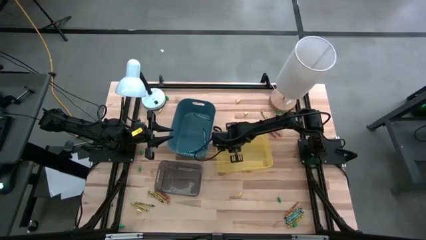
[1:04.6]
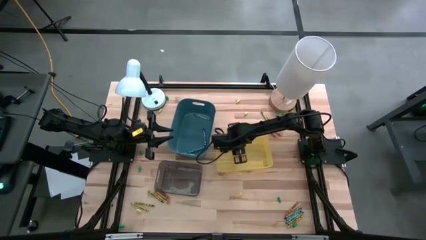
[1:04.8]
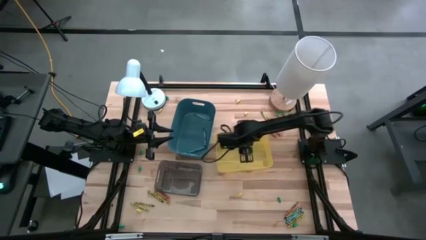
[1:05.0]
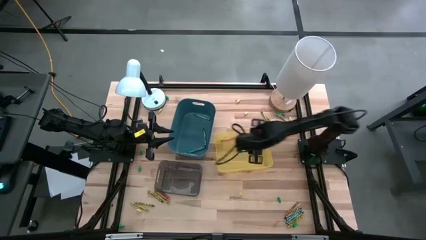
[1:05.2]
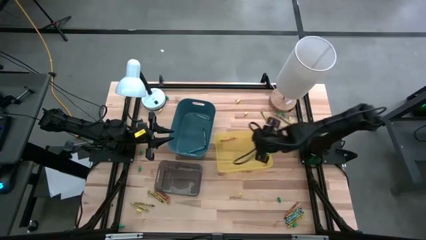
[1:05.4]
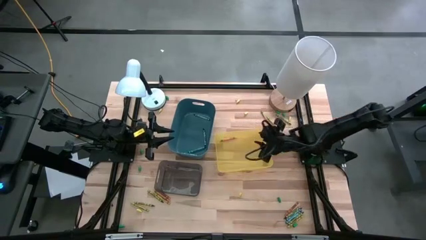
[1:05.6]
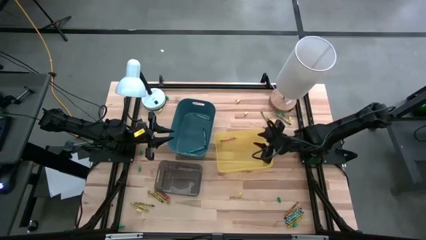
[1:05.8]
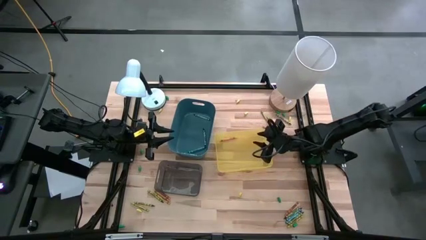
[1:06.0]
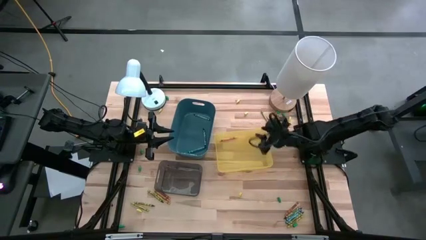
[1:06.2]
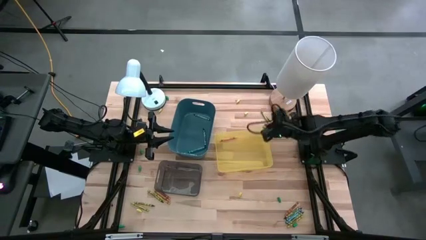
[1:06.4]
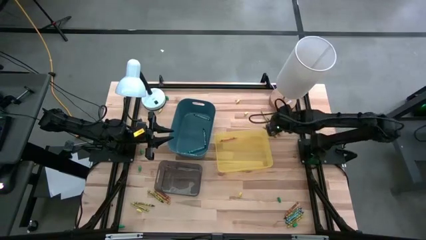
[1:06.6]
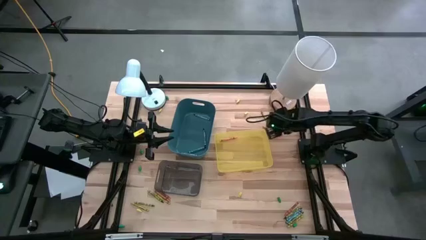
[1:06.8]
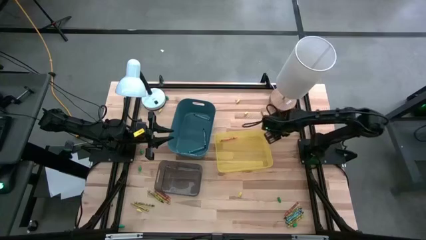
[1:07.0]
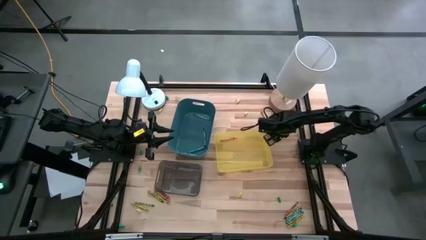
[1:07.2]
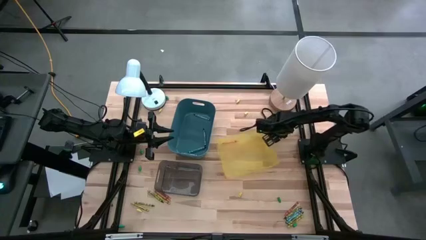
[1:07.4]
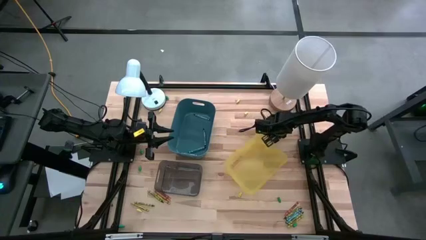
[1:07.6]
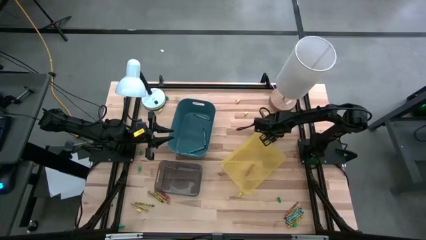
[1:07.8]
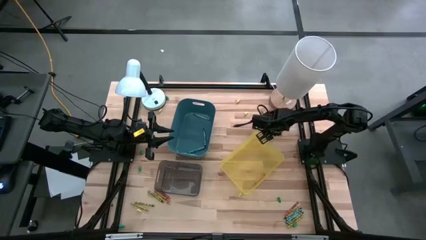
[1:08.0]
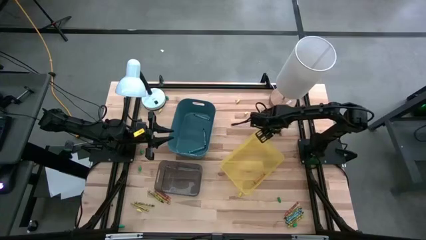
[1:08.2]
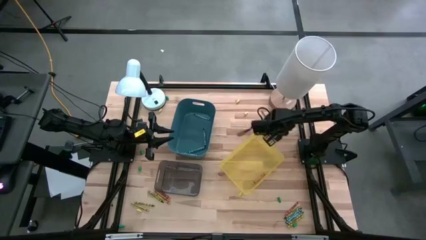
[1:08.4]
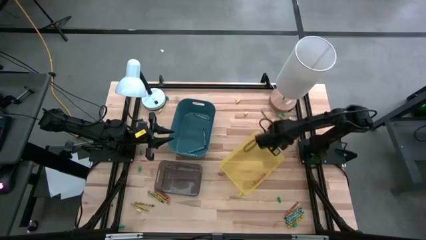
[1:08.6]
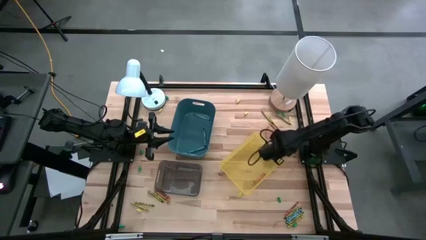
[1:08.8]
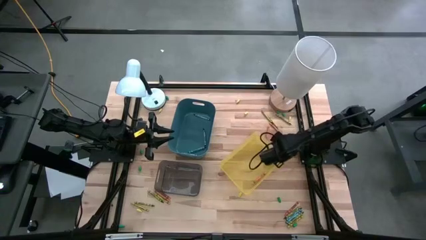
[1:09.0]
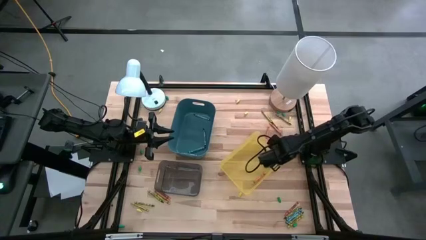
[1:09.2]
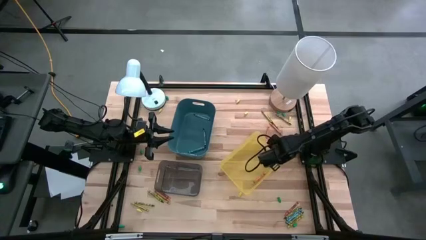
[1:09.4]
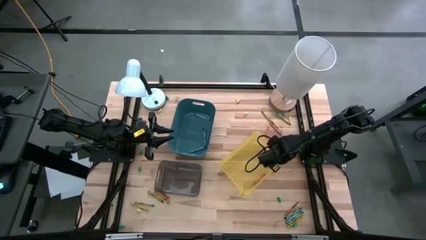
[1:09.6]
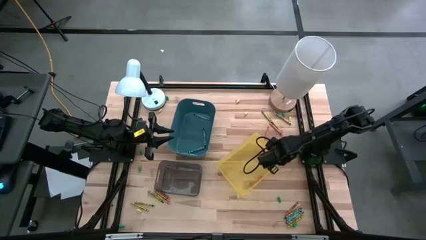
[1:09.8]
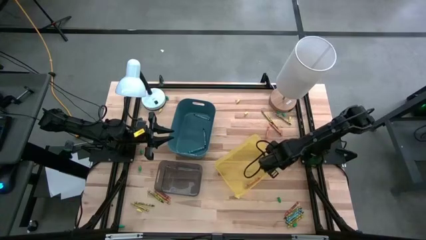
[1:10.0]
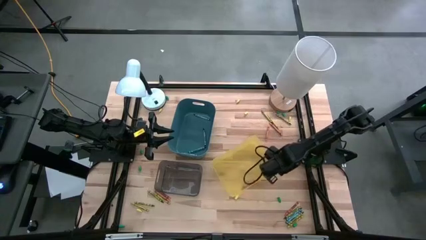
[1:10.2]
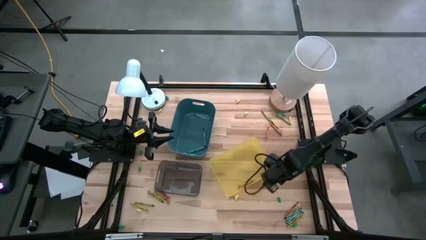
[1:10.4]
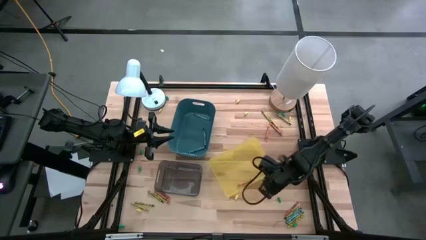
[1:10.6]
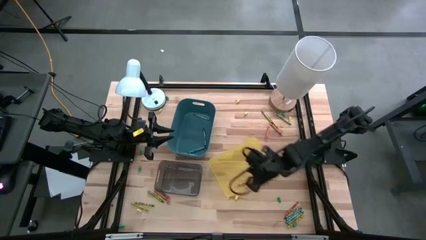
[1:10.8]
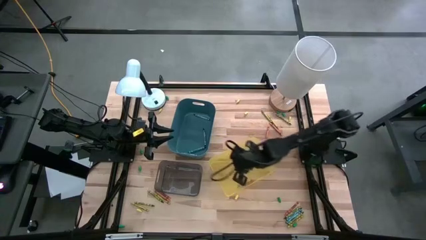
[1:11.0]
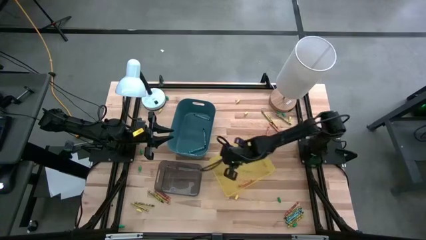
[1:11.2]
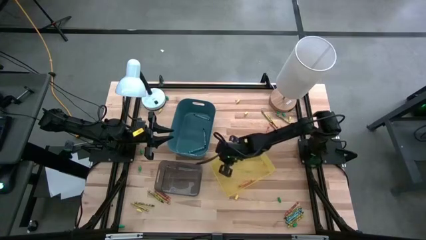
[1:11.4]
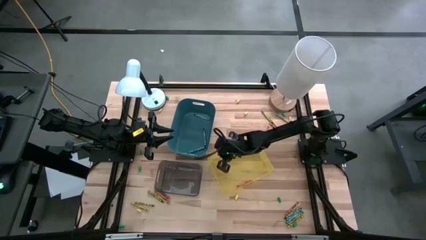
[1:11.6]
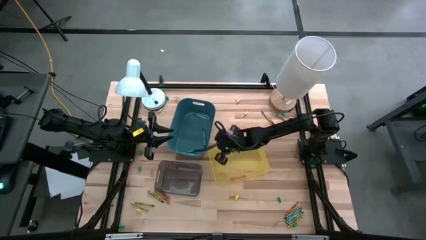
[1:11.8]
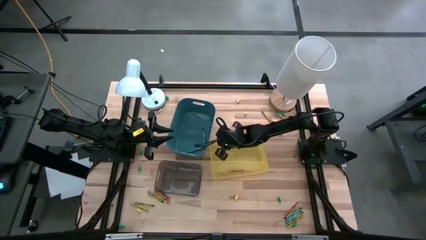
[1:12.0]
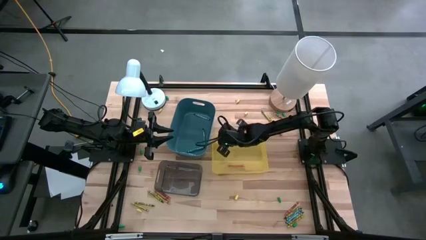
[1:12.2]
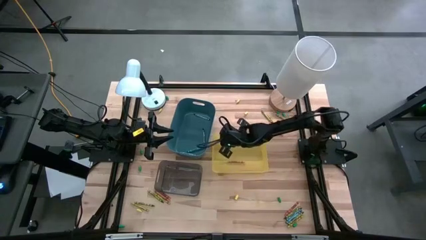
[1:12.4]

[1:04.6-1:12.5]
Task: Sort crayons
Adjust the yellow bin

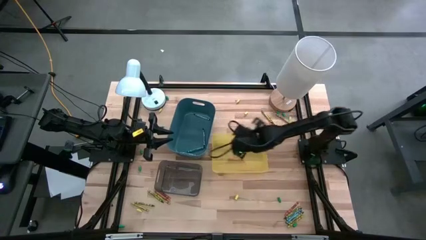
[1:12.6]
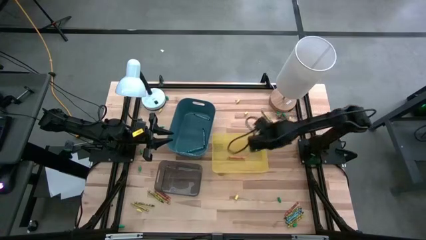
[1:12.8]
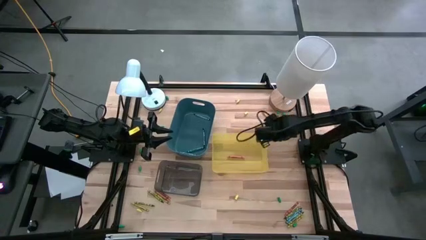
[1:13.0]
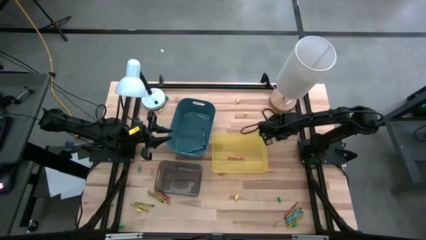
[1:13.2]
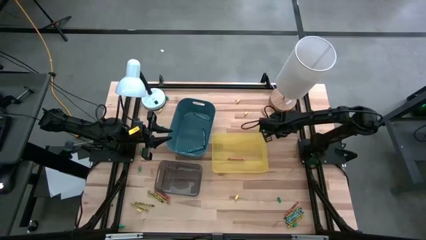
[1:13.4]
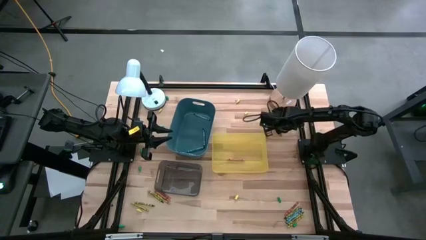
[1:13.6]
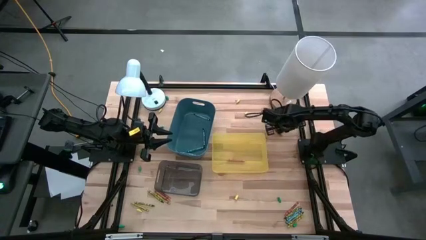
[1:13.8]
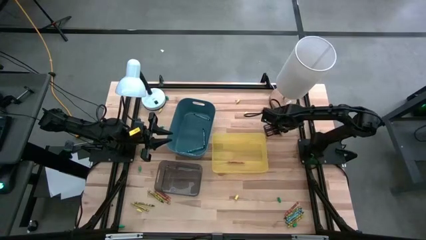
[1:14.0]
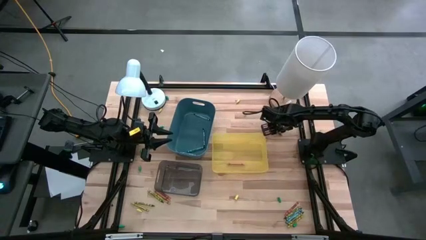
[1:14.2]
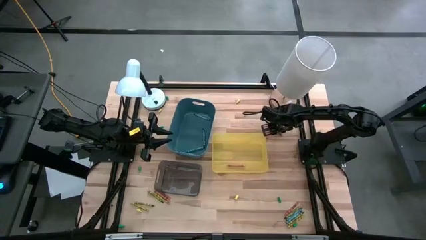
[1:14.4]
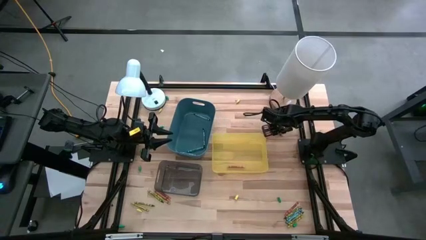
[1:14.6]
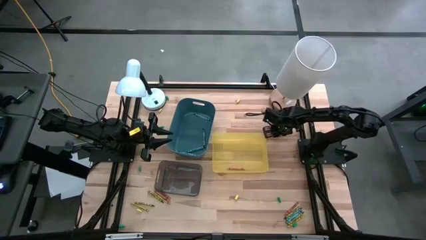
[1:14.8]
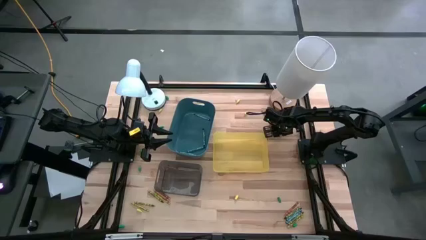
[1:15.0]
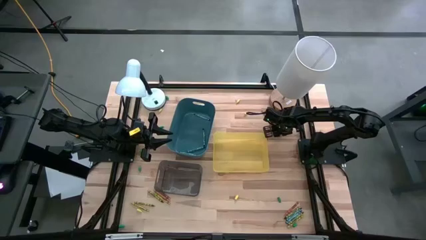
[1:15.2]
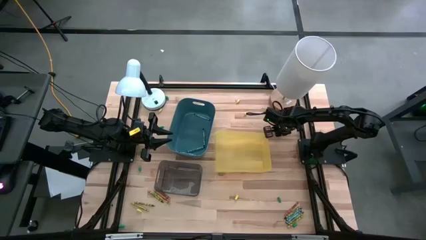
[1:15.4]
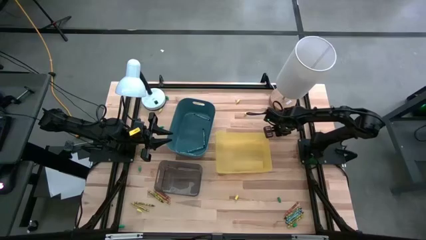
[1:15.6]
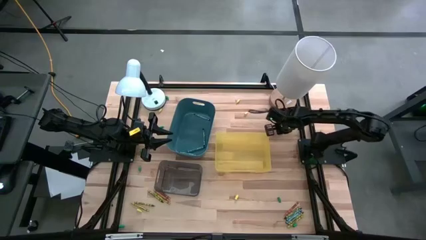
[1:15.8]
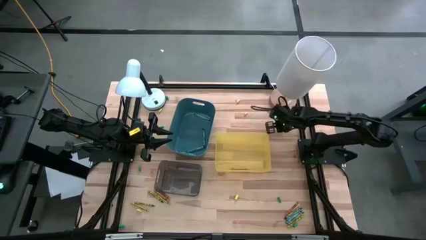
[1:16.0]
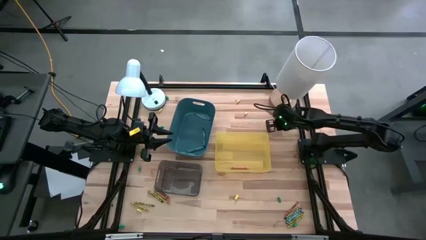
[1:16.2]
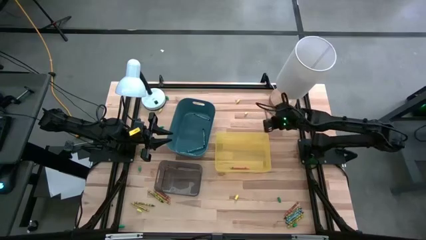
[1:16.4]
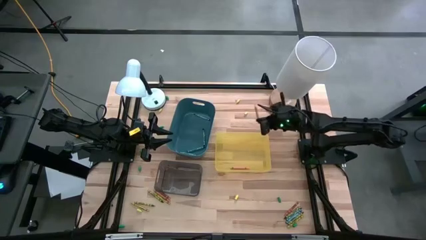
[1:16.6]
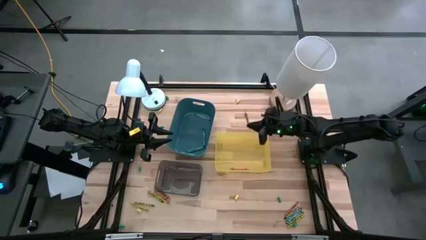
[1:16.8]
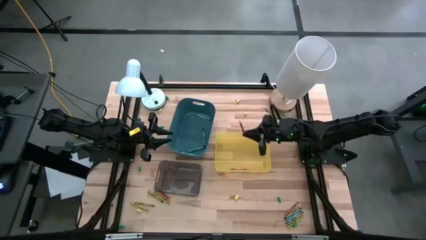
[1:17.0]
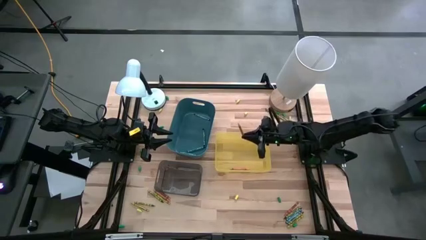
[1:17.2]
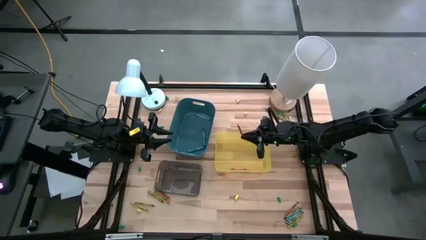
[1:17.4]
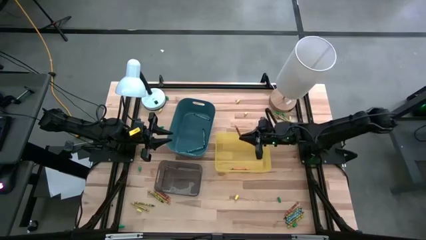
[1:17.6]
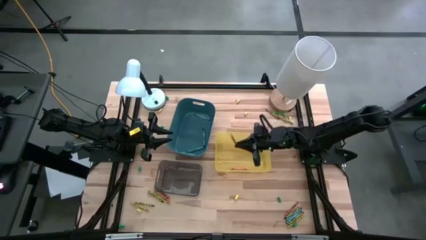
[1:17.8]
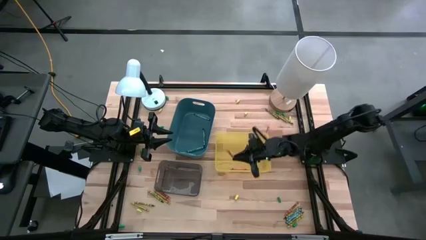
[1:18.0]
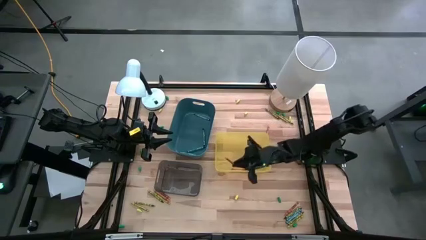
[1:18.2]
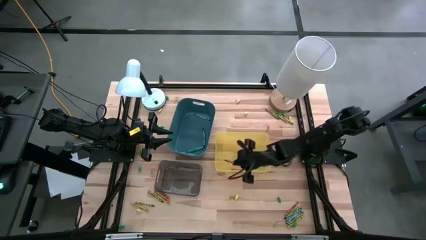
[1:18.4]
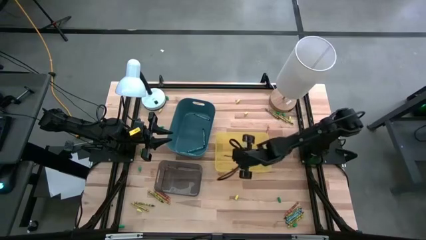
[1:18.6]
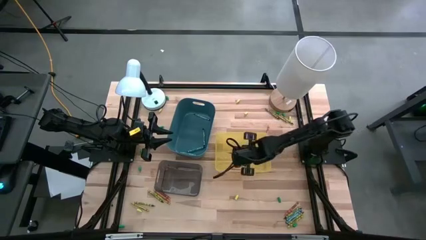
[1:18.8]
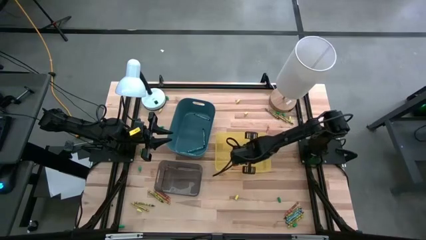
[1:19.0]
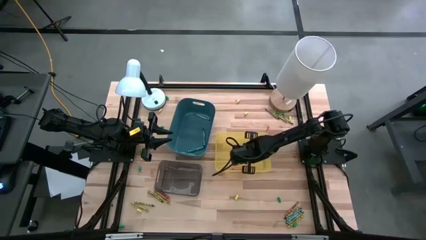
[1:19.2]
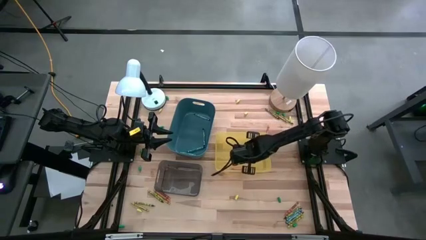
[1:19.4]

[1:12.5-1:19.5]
Put the orange crayon into the yellow bin

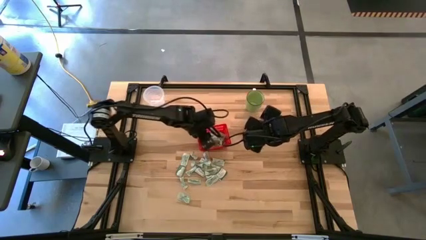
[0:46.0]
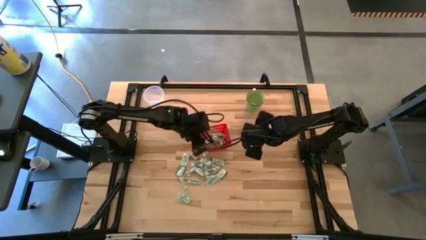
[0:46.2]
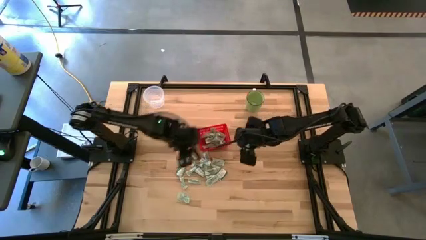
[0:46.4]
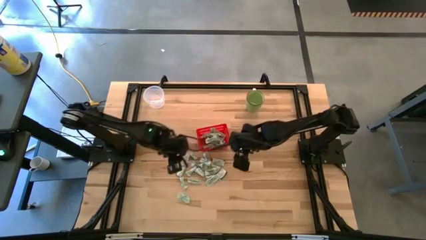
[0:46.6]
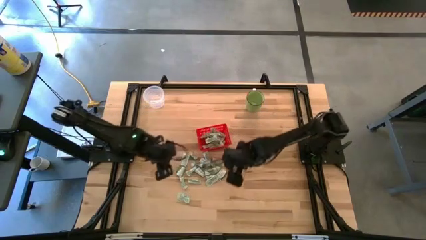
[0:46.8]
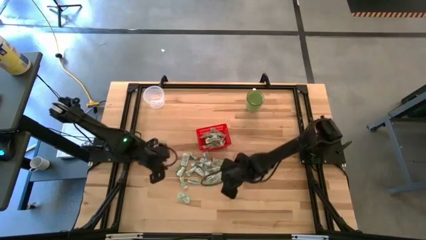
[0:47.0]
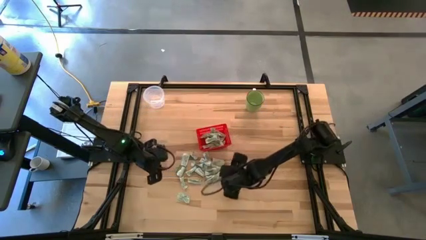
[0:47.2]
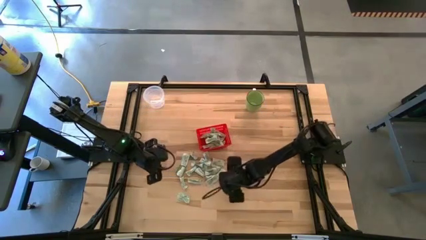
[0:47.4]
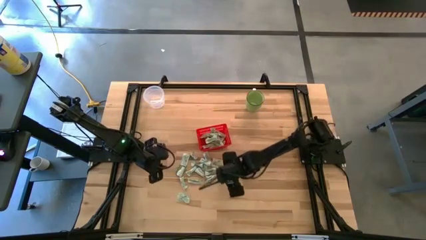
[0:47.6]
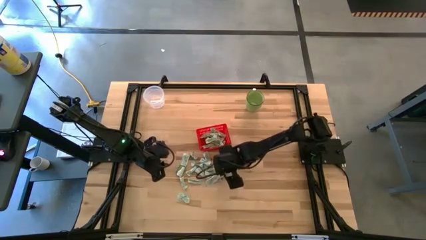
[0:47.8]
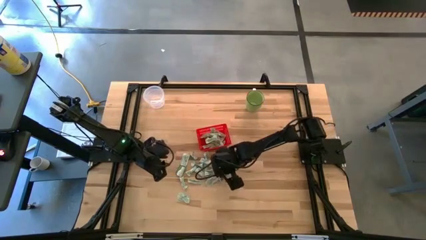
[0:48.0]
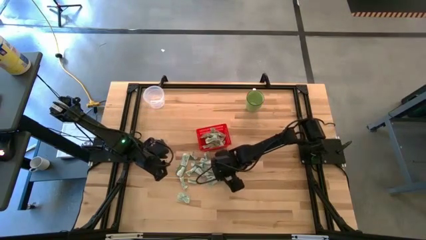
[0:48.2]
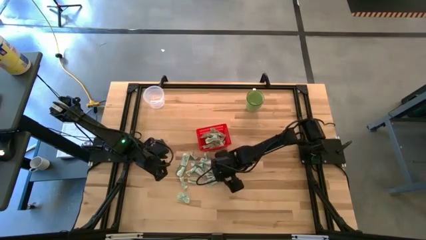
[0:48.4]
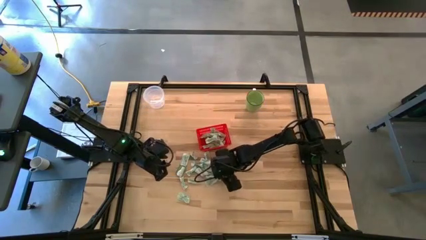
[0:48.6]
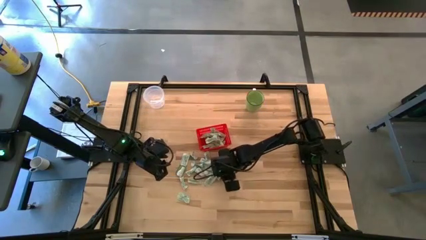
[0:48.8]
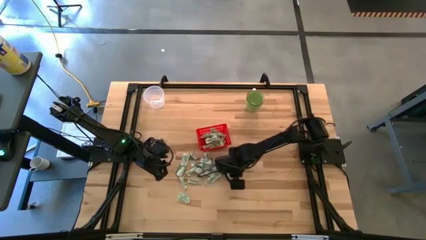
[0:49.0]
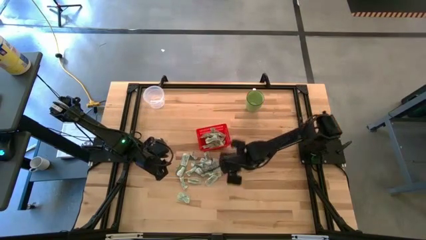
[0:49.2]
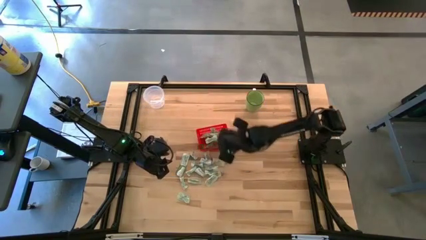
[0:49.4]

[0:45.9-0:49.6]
Task: Pick and place Stevia / Truvia into bins
Put the truvia packet into the red basket
